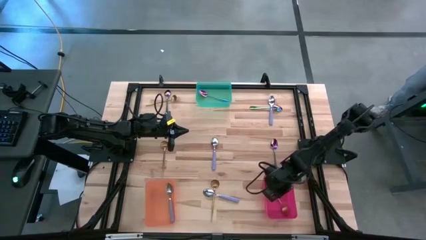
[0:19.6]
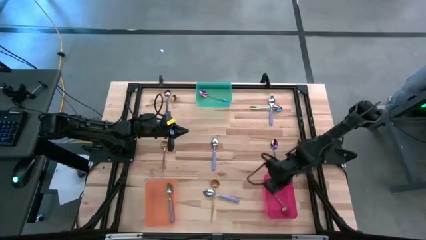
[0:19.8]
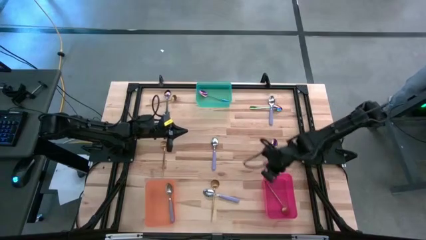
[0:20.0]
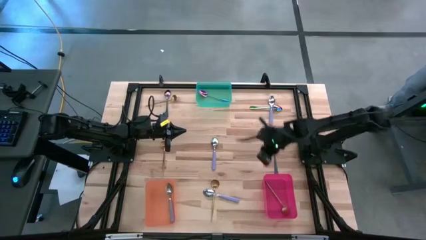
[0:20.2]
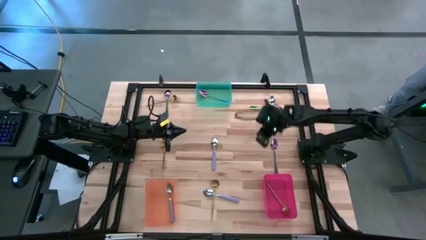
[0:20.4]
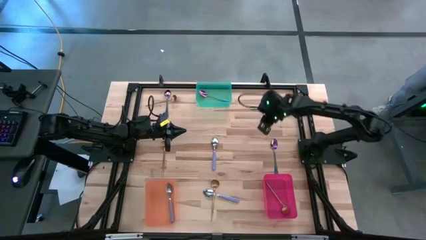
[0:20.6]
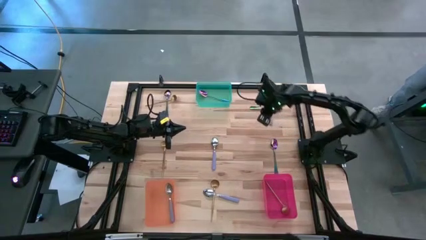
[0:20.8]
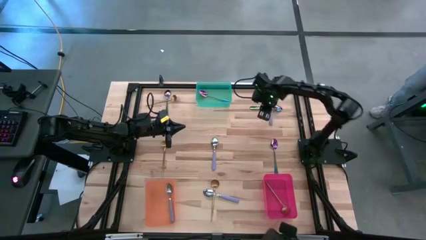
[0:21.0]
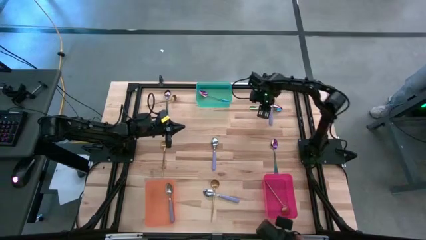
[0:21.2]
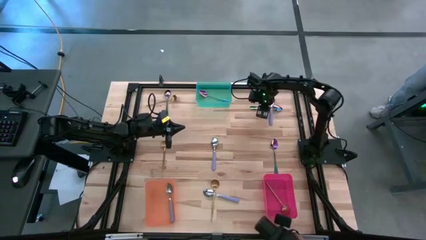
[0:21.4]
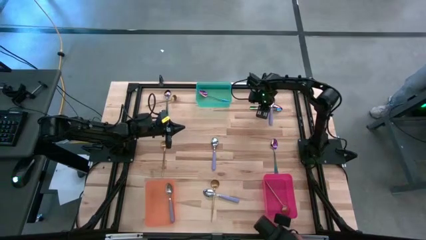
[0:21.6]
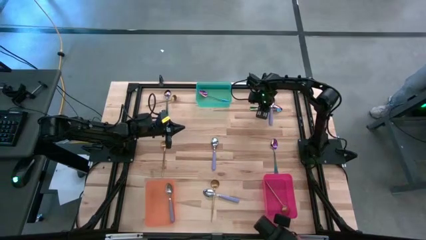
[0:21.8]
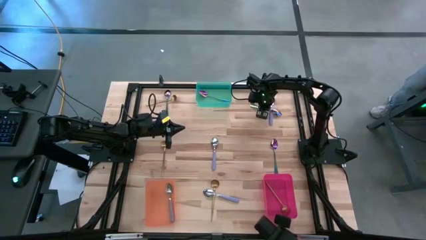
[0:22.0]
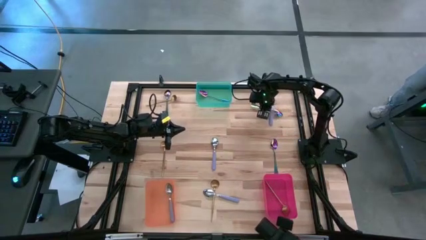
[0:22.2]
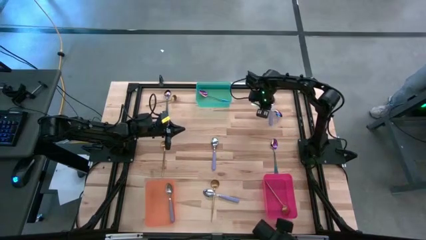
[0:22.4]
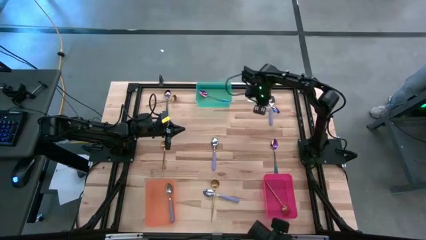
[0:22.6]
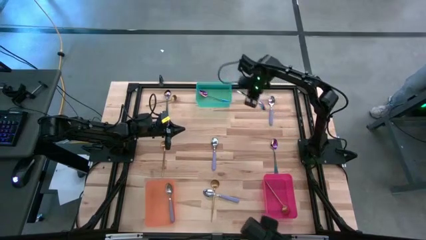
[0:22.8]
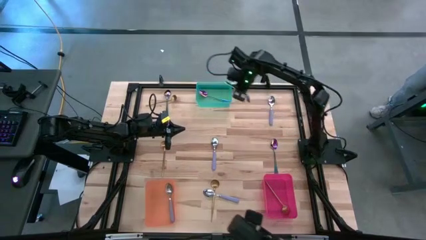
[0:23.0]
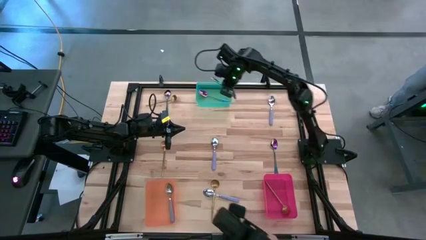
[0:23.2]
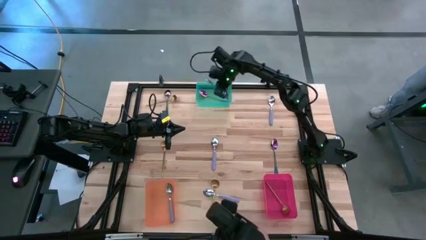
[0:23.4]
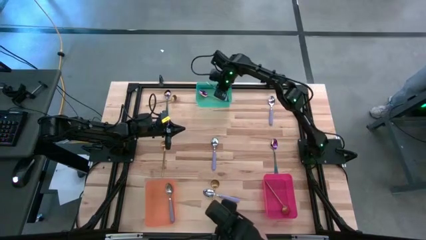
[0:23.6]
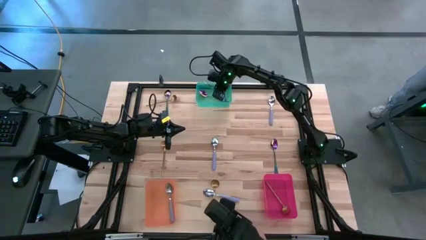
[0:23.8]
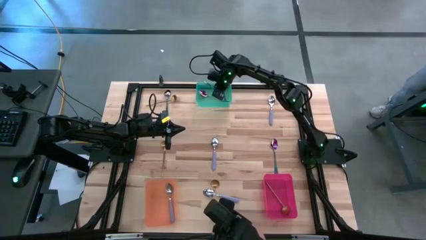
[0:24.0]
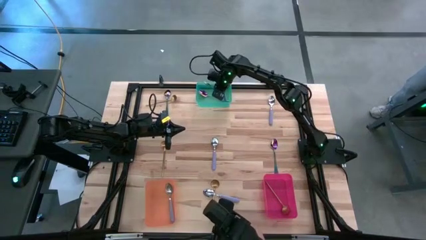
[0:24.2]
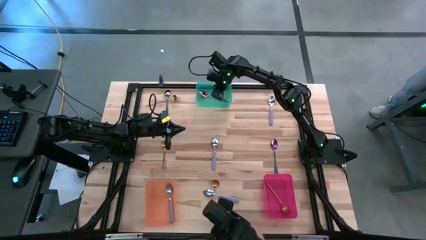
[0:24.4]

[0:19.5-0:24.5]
Task: Sort silverware by color (type)
Put the blue spoon into the green bin

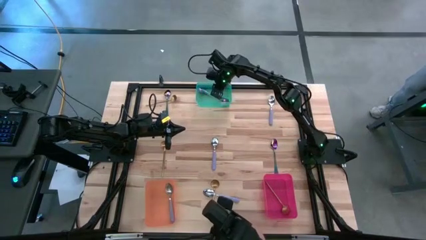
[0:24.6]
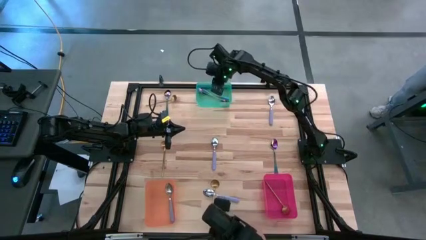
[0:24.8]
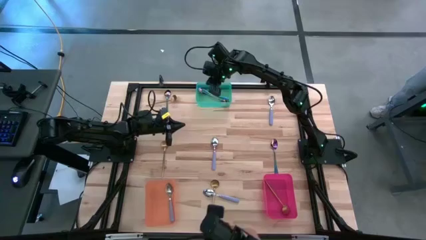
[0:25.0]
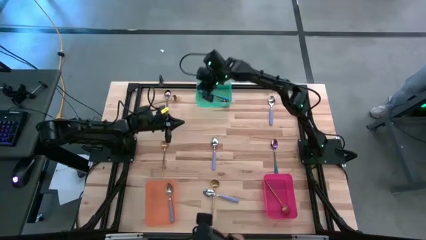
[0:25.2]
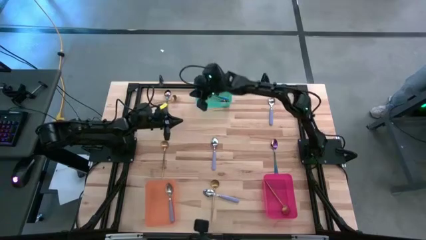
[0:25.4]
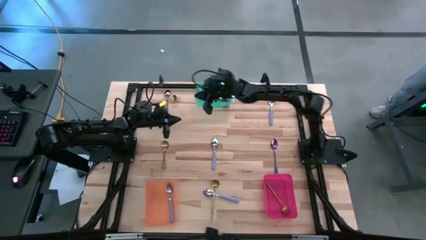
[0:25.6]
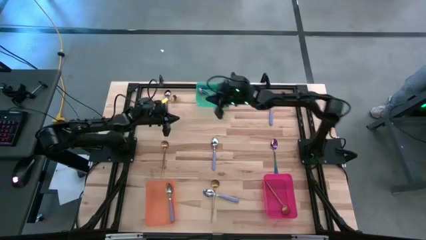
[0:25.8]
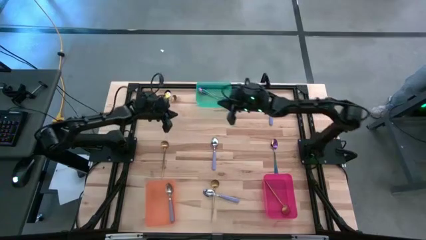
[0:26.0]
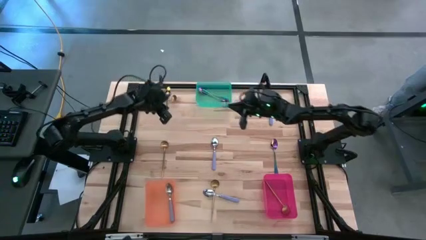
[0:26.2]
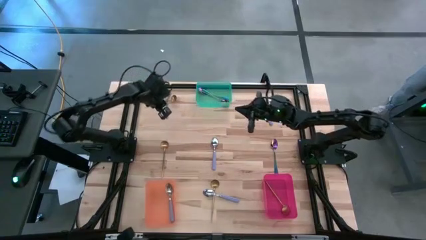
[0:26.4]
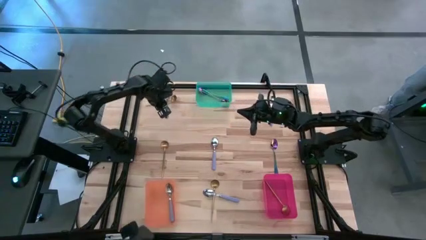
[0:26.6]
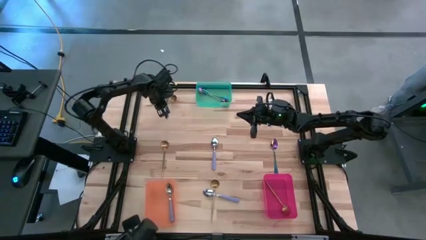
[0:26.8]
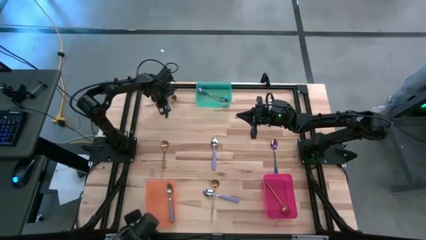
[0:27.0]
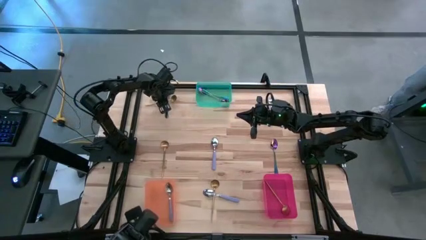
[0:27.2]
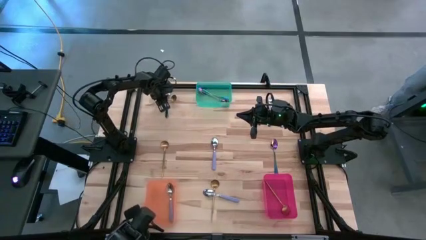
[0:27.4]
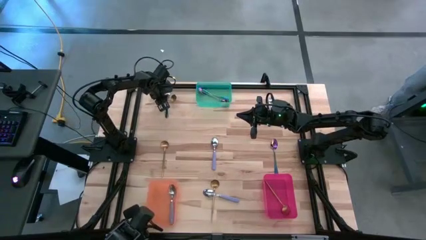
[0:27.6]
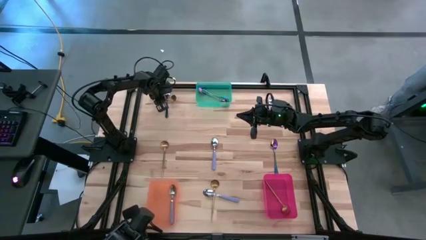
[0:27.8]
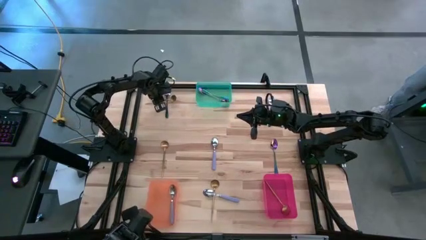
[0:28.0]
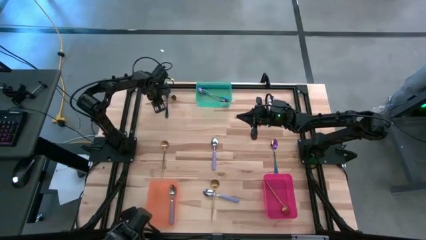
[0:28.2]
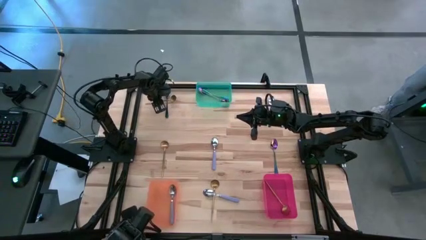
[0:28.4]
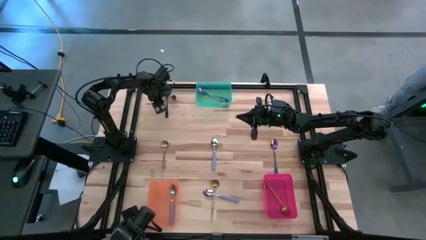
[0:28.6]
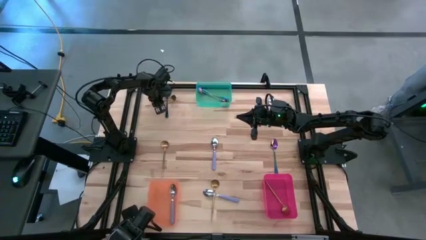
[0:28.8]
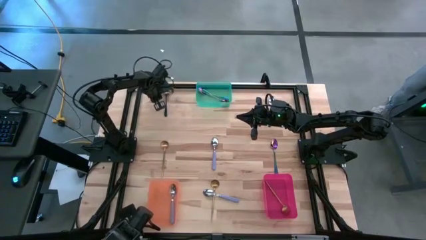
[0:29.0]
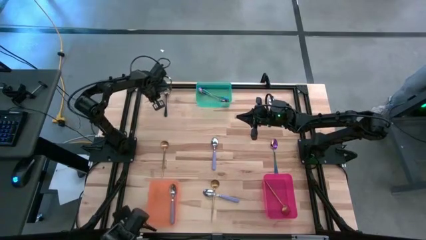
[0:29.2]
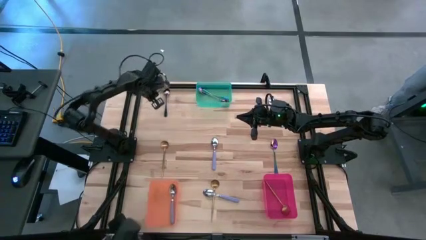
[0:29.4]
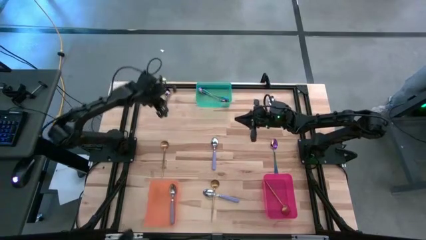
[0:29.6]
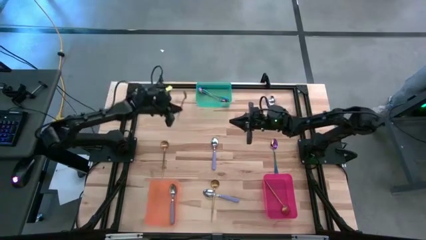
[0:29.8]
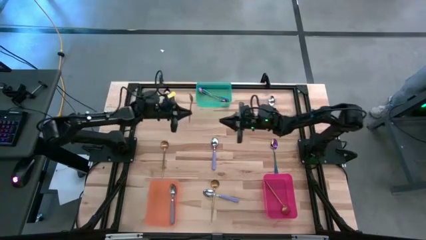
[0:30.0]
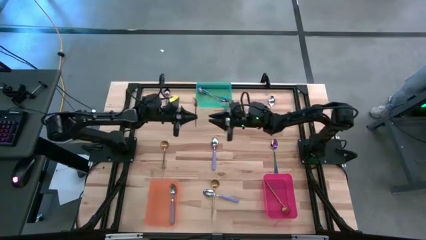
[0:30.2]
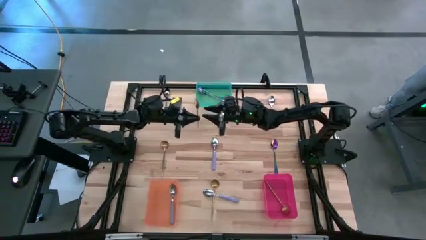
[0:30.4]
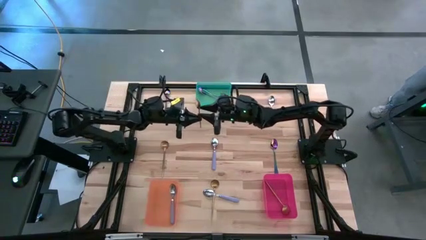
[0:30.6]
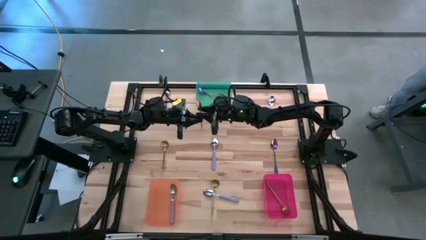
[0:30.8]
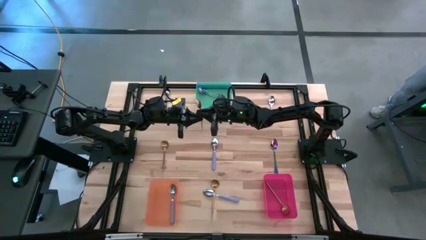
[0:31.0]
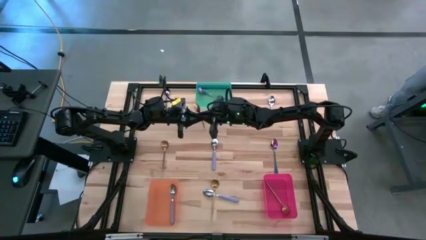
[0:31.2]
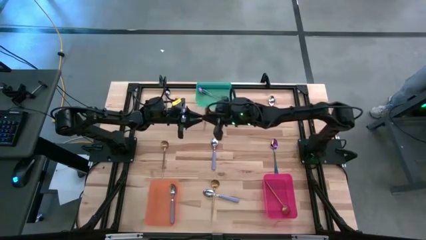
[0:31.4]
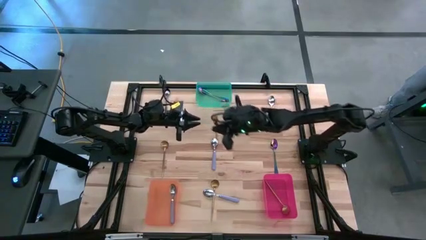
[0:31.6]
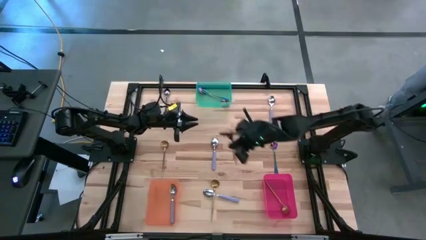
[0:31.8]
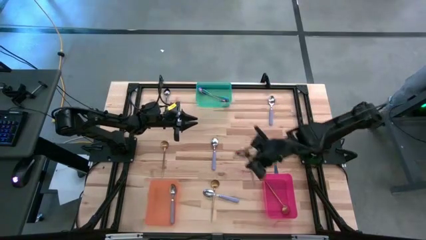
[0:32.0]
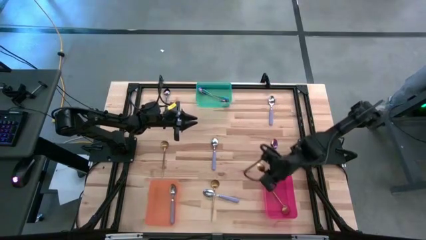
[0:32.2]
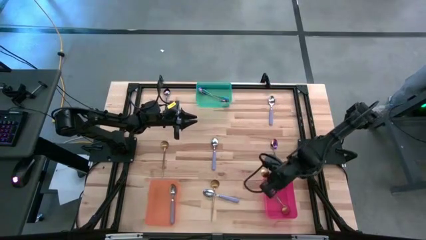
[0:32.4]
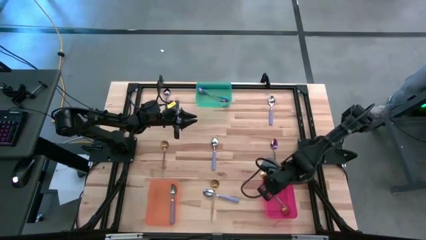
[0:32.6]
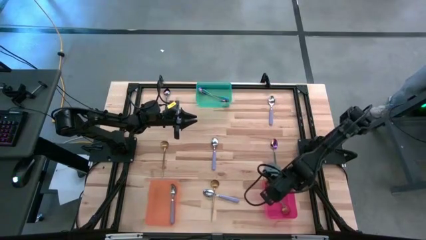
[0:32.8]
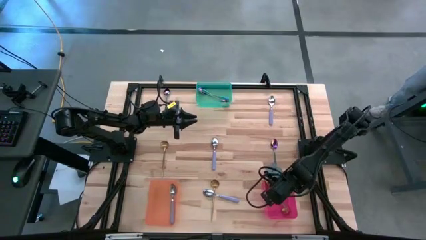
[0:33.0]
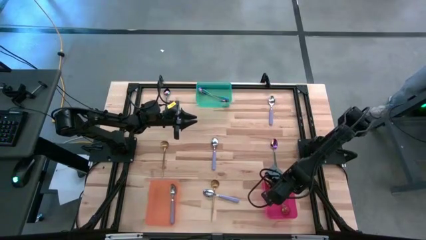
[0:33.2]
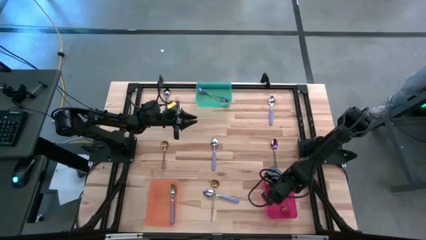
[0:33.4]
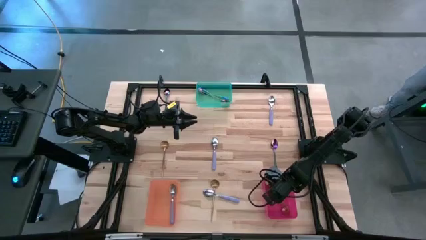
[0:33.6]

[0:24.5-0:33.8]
Put the yellow spoon into the red bin

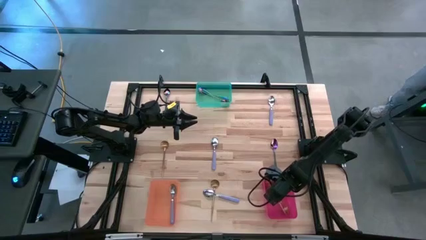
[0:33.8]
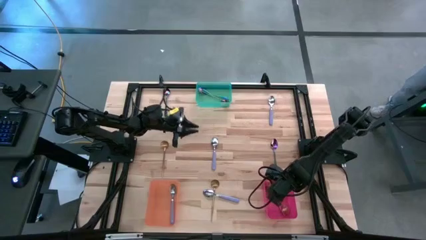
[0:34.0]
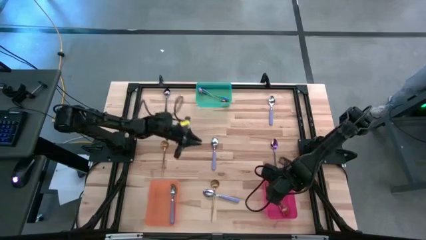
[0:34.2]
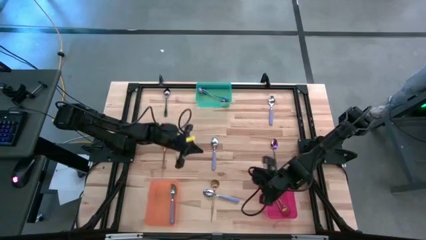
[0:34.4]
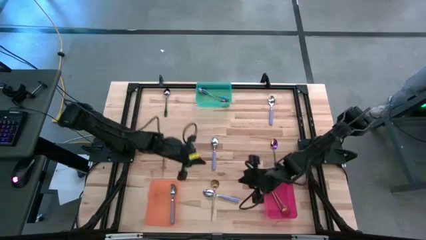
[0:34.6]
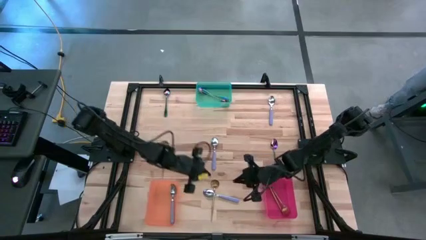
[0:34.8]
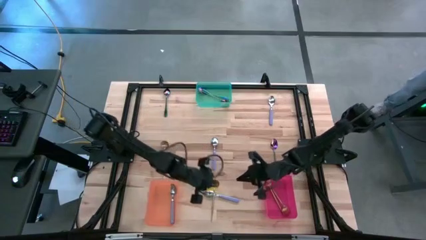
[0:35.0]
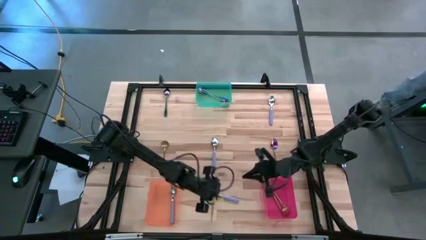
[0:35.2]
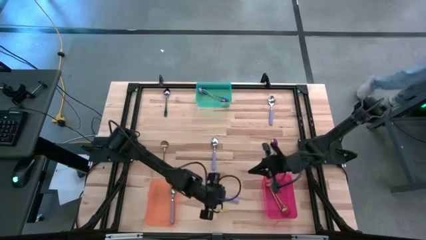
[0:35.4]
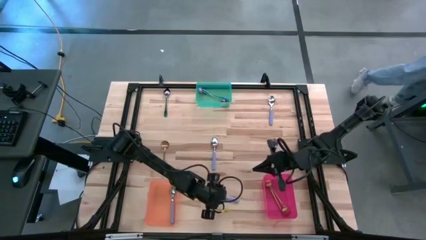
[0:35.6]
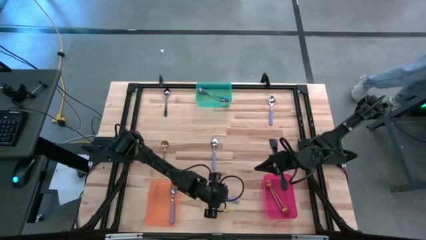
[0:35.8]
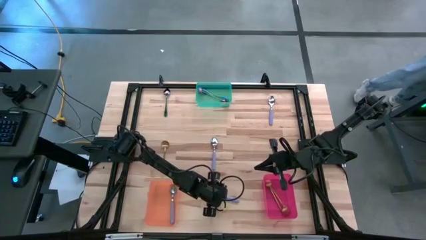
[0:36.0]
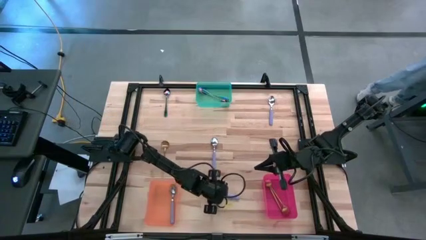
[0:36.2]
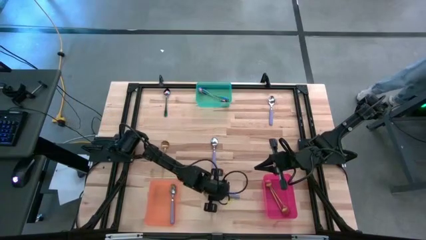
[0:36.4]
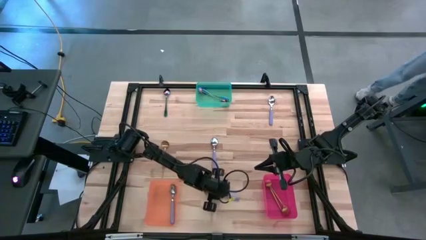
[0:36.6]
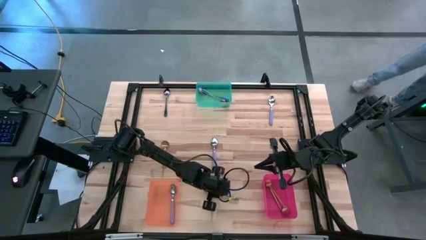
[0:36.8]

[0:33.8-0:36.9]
Put the purple spoon into the orange bin
